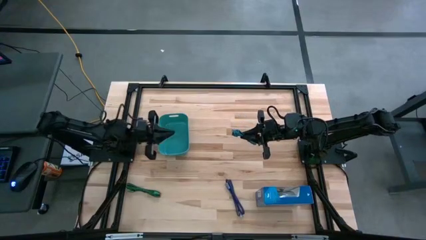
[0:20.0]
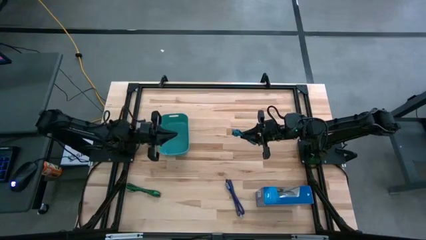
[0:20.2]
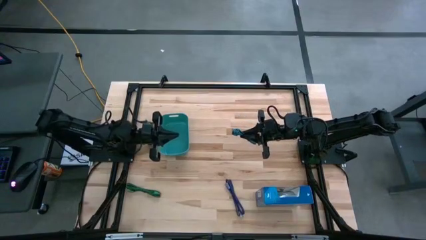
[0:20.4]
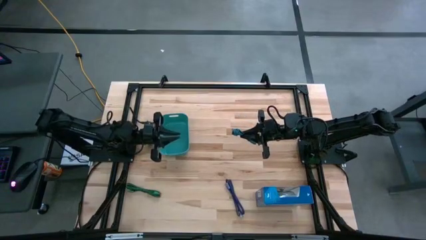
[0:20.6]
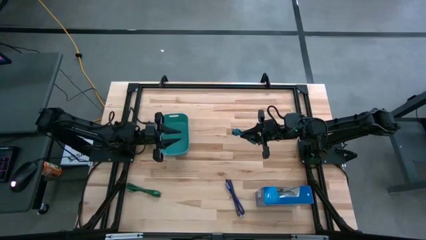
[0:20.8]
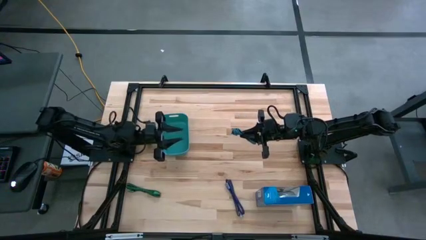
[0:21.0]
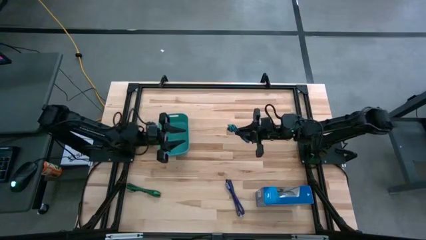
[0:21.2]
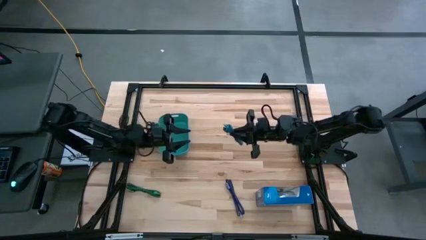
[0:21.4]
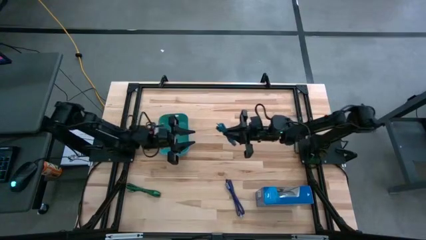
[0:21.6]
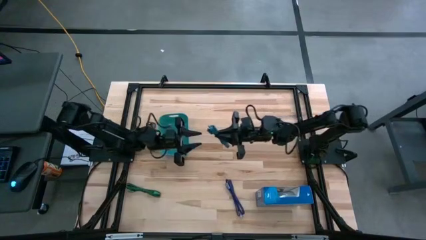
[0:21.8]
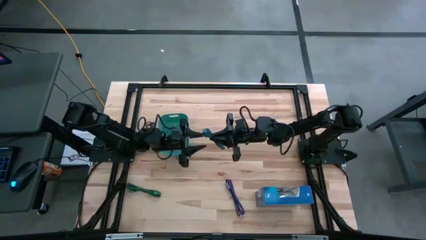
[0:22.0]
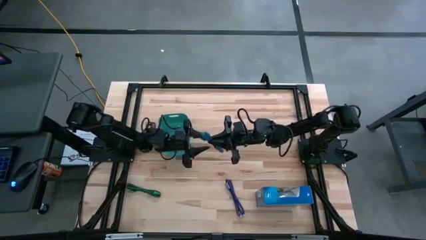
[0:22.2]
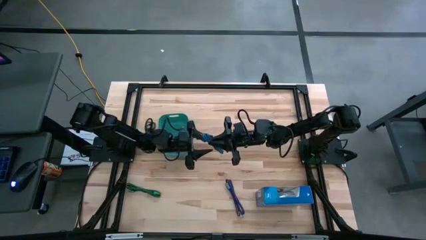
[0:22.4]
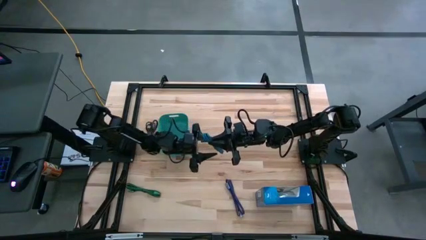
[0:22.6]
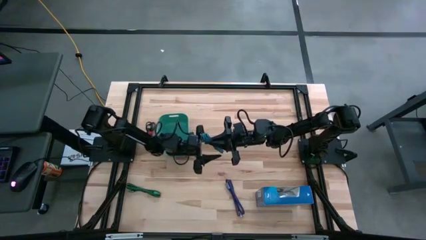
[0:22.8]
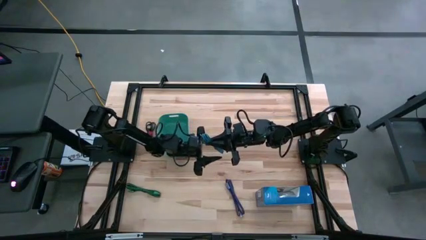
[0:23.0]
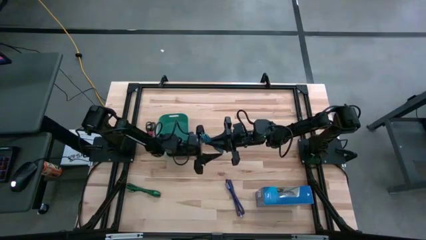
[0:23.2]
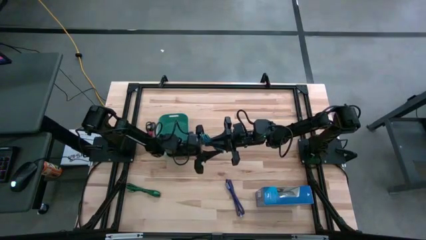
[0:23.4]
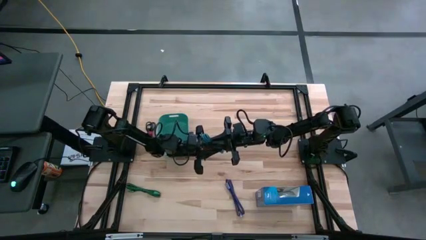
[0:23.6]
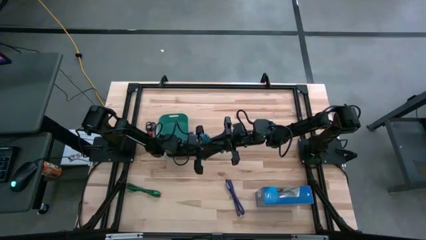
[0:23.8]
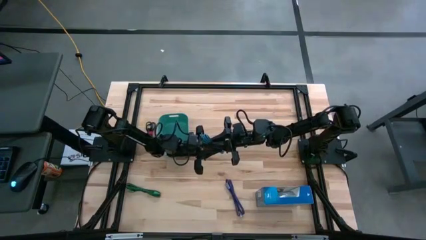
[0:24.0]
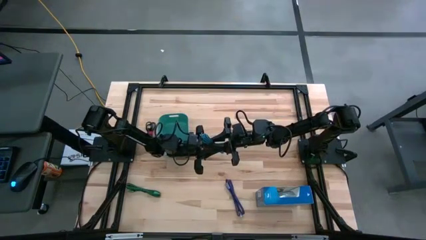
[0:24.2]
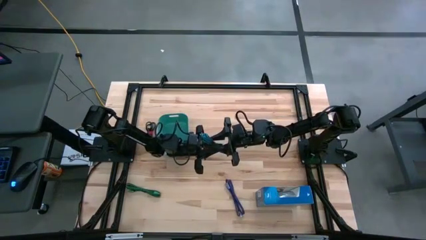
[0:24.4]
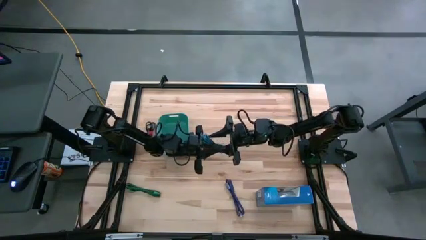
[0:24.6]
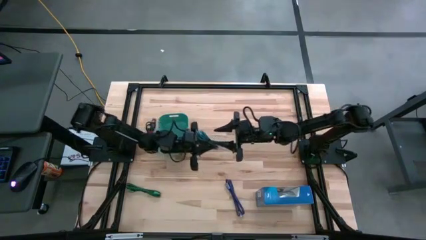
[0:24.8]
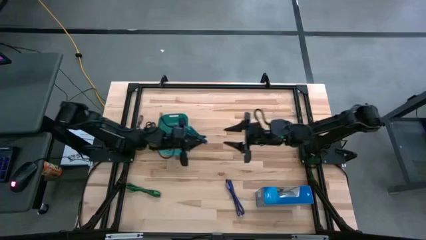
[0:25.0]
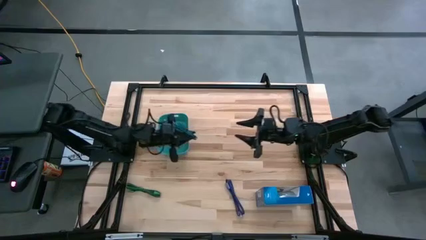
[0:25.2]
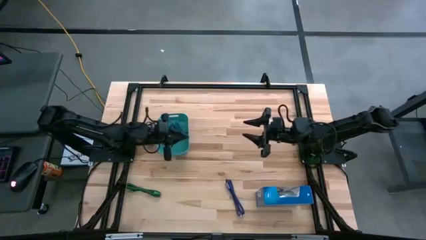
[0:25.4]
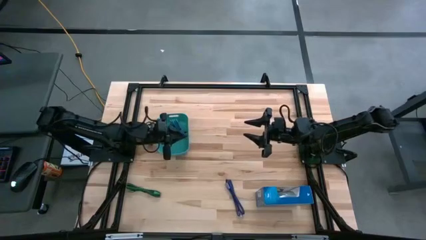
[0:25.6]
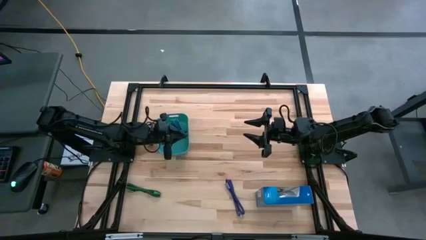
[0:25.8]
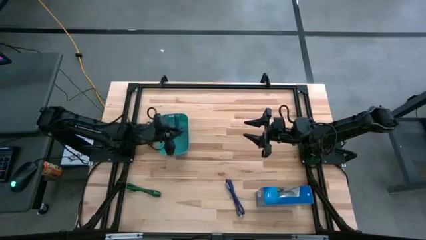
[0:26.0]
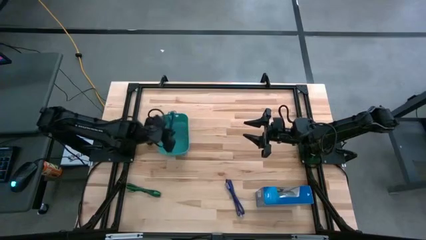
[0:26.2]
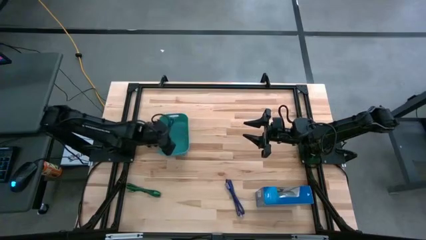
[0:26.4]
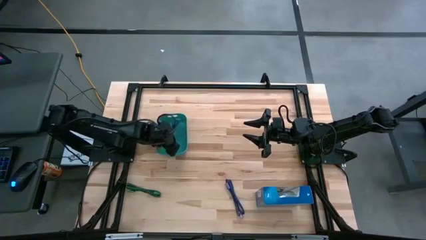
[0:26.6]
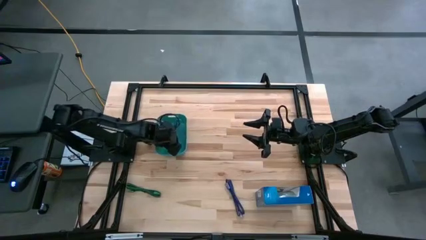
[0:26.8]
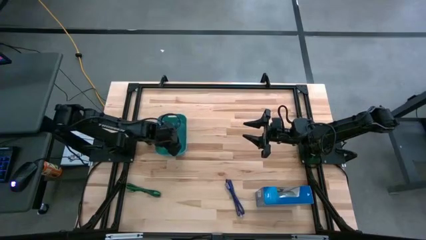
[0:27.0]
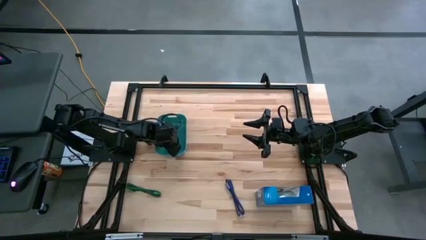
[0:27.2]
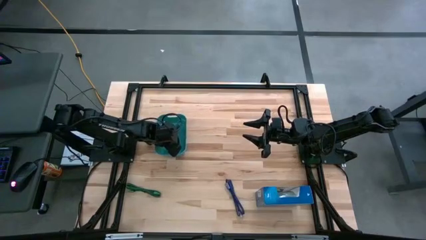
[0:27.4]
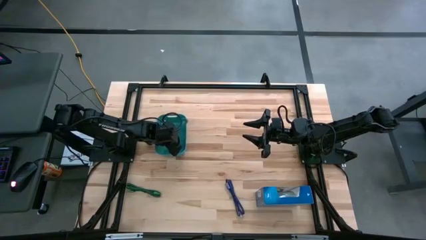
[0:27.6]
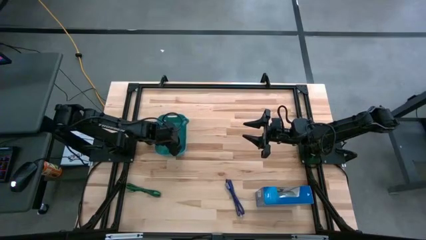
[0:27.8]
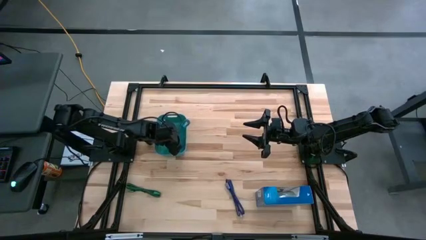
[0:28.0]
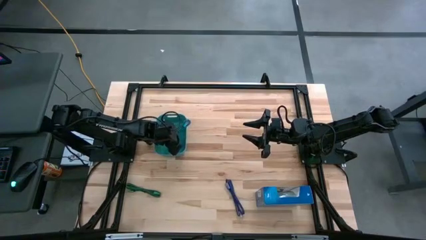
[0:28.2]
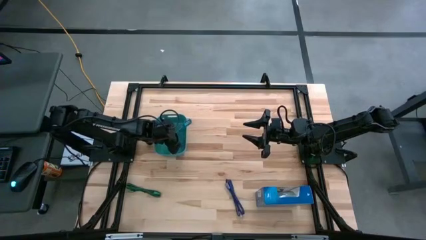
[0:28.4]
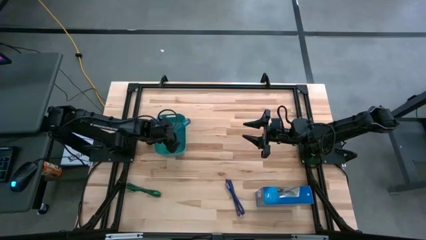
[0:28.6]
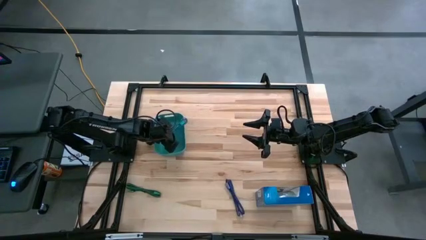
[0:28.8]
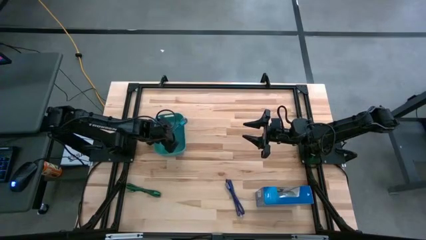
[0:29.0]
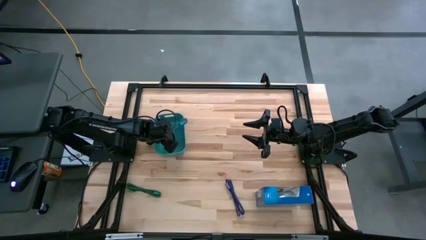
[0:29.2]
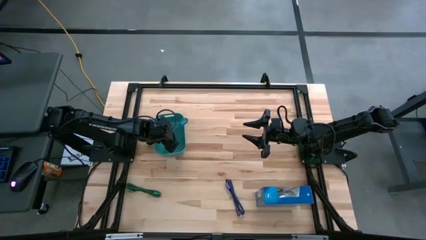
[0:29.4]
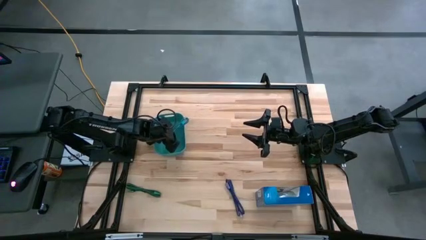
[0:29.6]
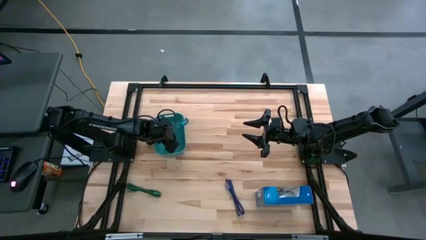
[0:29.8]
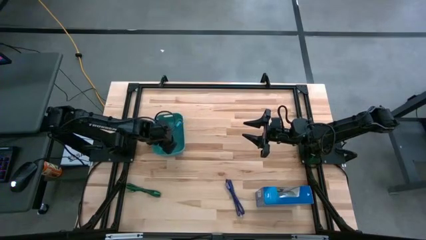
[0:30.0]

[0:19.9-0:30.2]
Task: Pick and place USB-C Cables
Put the blue charger cable into the bin

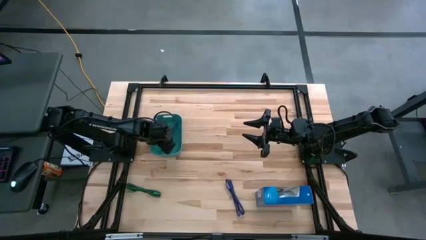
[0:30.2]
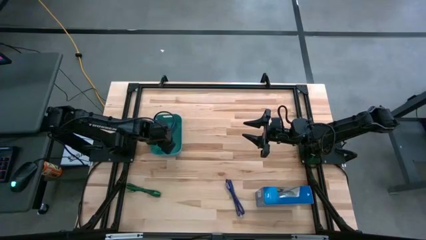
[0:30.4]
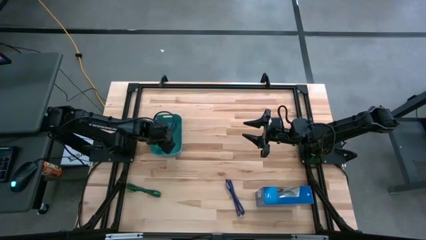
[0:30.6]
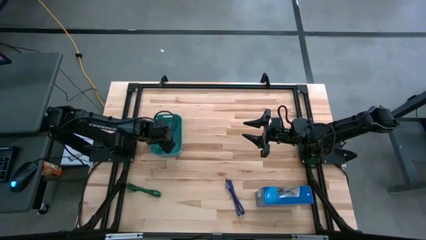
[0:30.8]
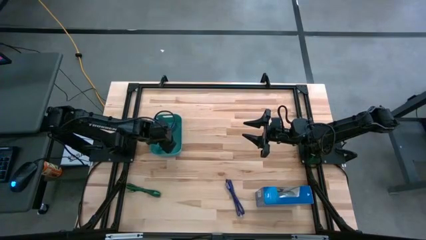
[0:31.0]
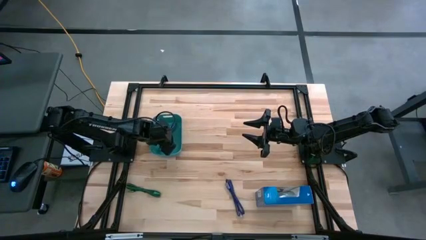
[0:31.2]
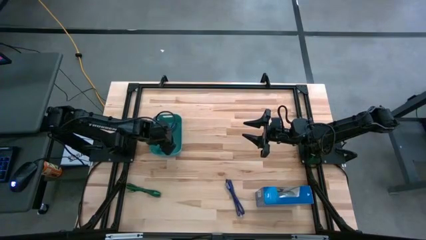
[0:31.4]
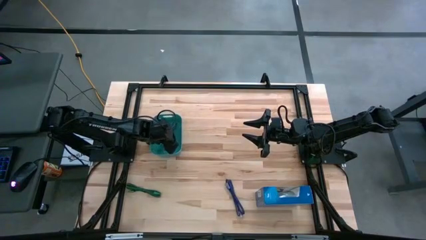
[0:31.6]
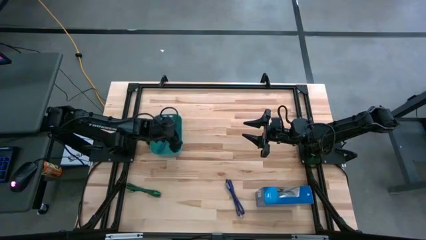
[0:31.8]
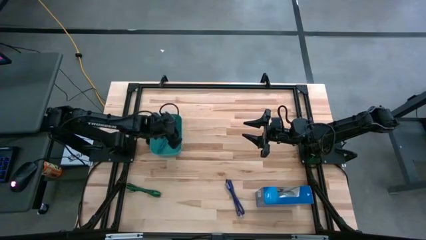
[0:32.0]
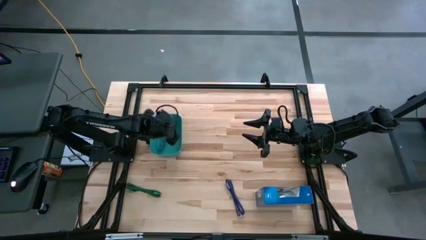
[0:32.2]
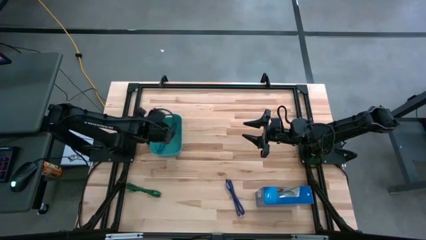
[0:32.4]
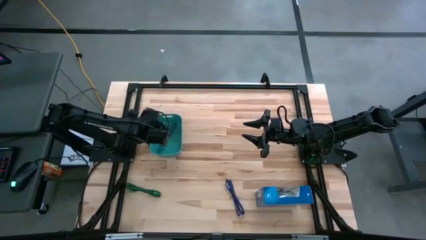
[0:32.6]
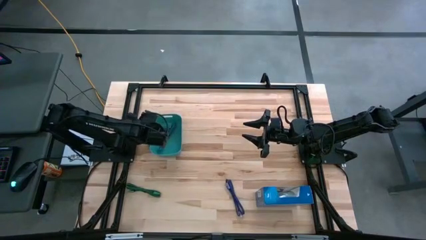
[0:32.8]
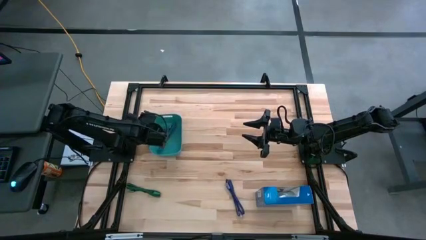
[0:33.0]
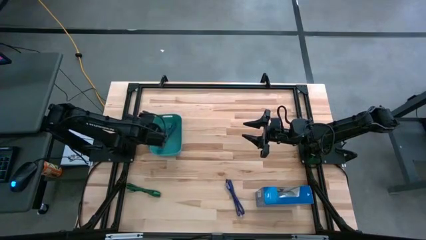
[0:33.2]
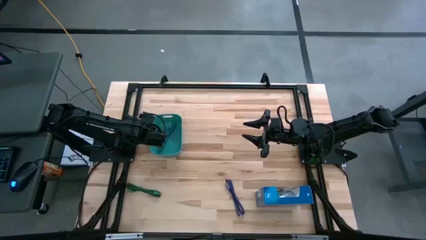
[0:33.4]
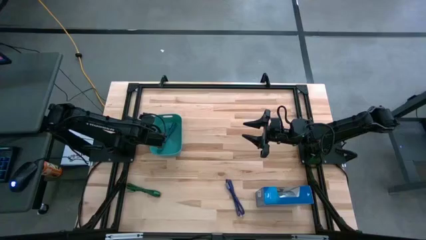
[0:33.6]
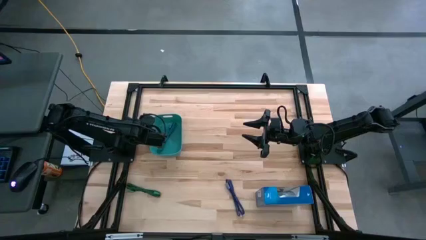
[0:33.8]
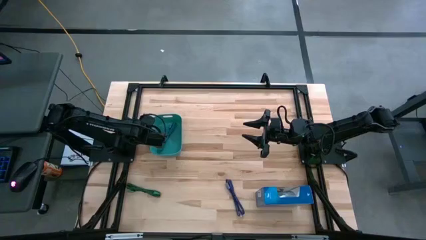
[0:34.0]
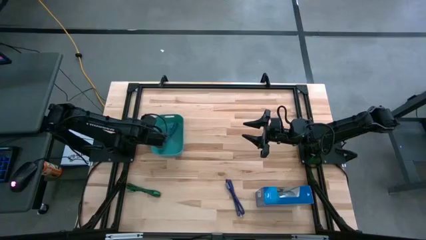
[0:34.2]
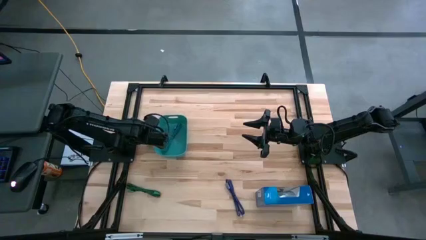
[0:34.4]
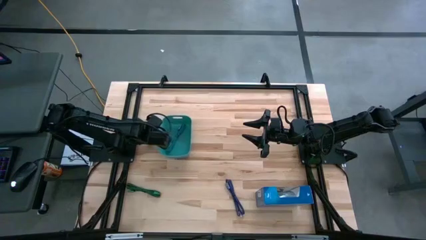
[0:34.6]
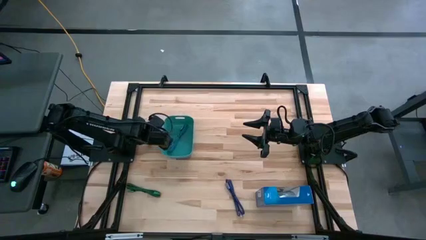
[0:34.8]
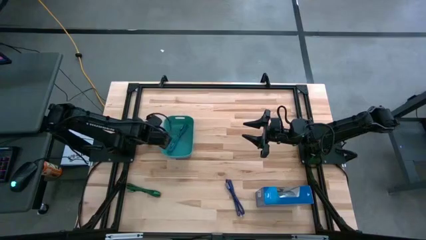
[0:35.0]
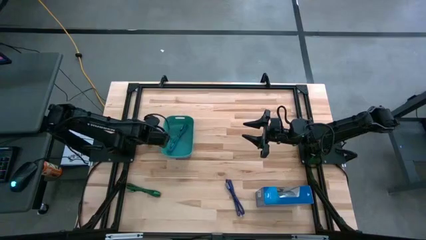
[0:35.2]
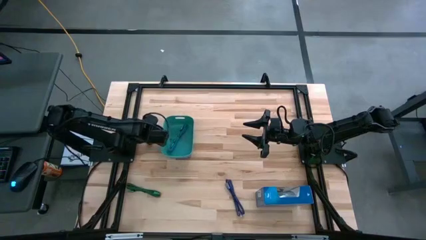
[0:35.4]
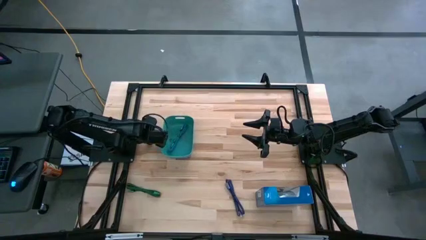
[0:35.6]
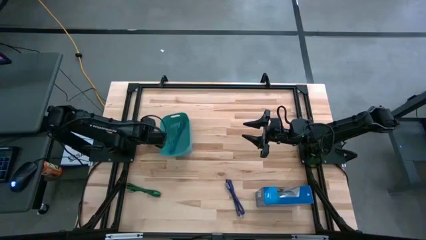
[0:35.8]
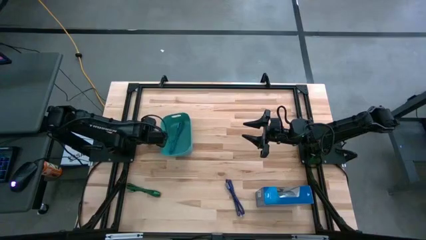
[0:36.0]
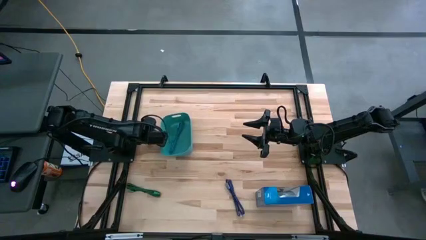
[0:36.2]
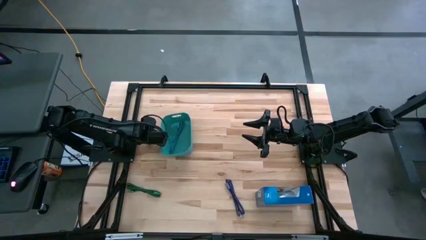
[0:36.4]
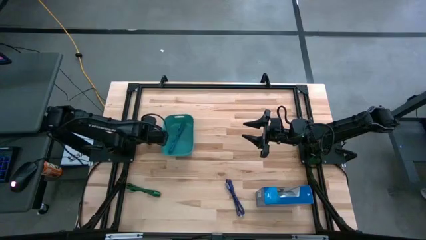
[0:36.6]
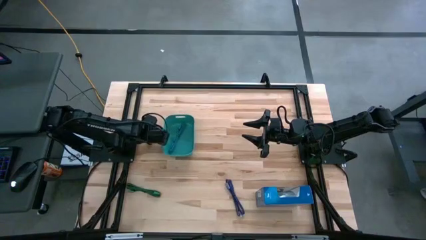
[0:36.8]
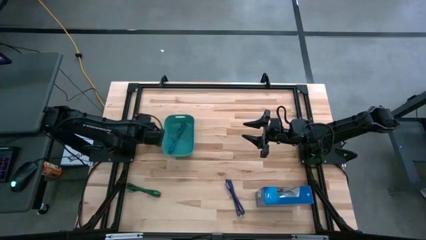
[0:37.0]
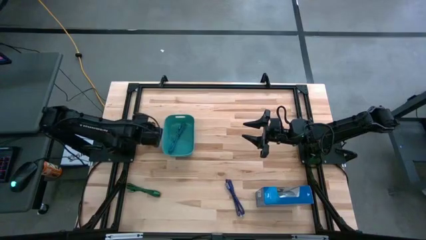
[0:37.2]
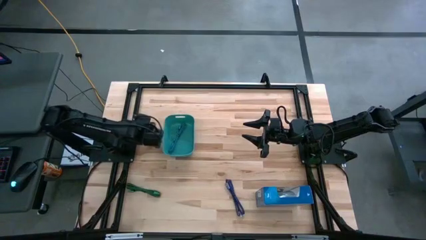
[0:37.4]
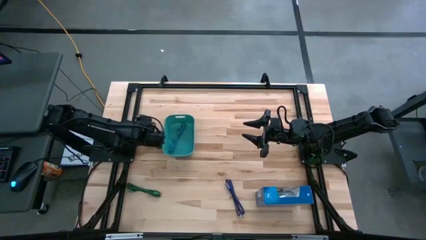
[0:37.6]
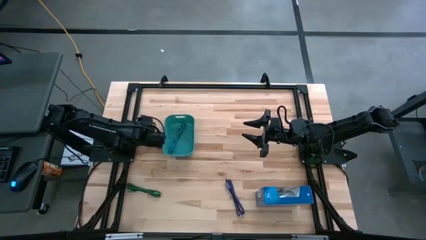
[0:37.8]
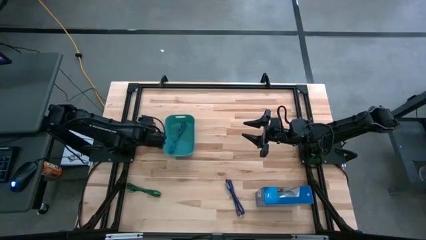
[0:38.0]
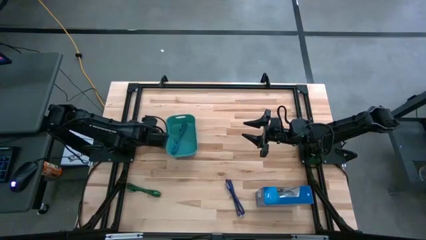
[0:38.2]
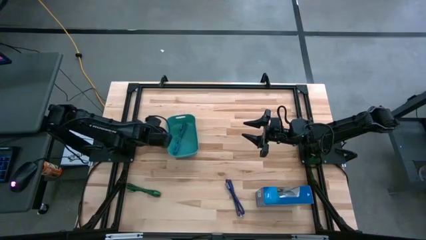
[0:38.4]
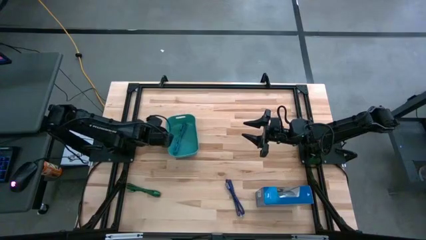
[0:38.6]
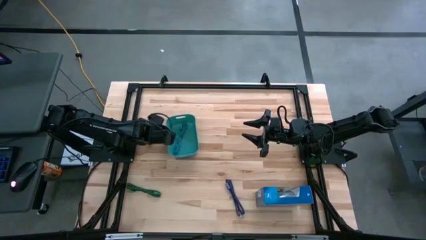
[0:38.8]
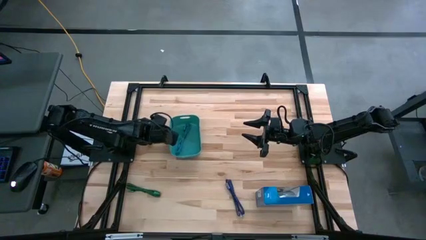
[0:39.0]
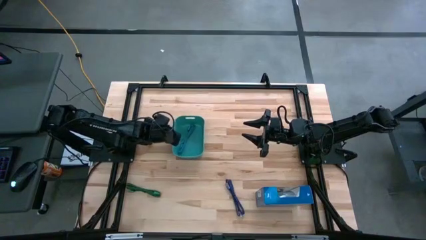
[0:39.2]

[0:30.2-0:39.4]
Adjust the blue bin
